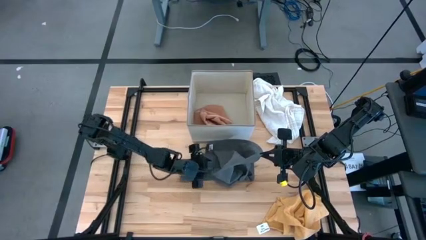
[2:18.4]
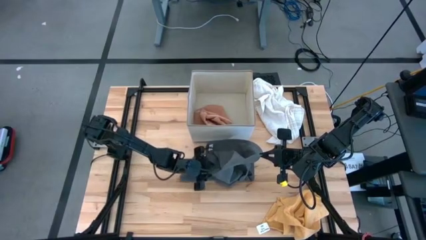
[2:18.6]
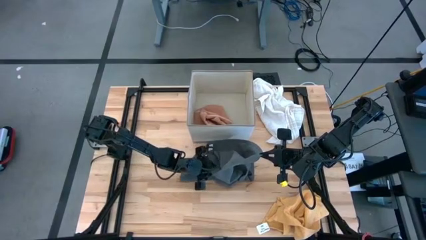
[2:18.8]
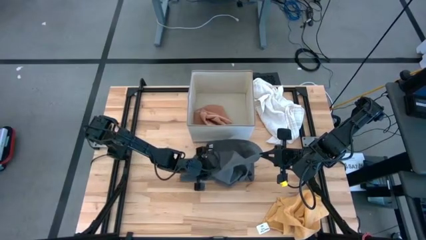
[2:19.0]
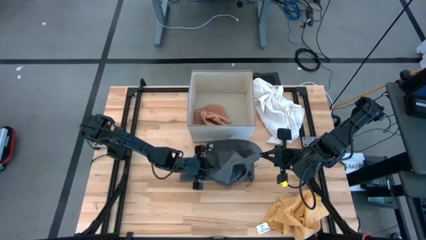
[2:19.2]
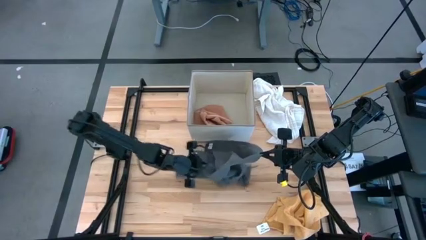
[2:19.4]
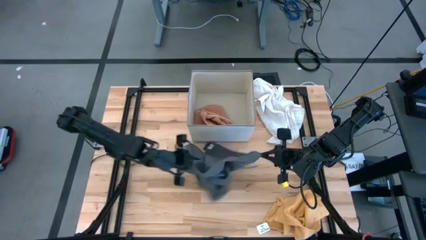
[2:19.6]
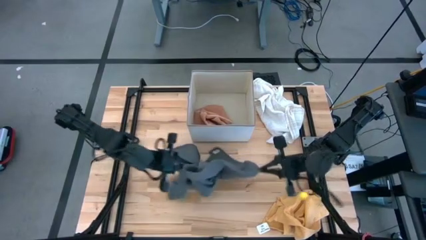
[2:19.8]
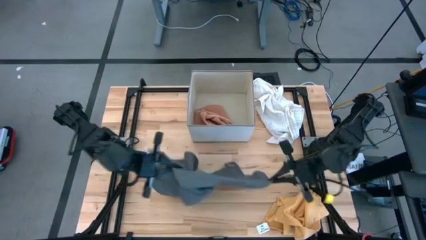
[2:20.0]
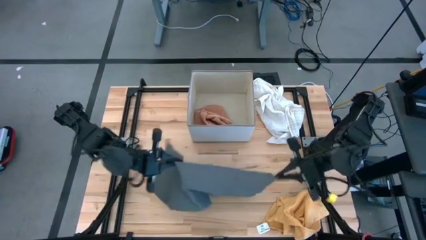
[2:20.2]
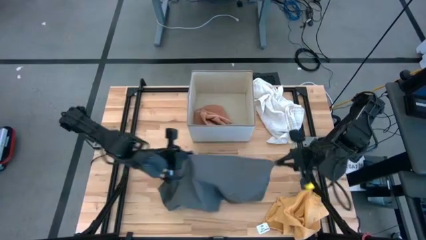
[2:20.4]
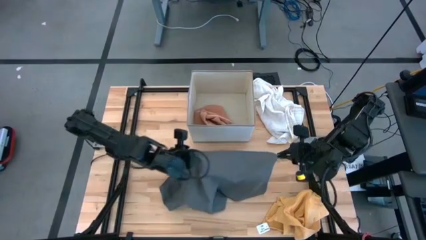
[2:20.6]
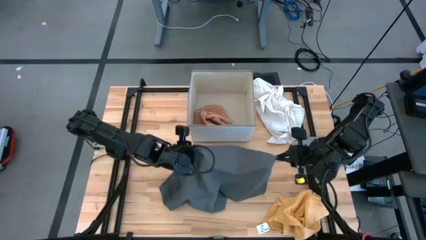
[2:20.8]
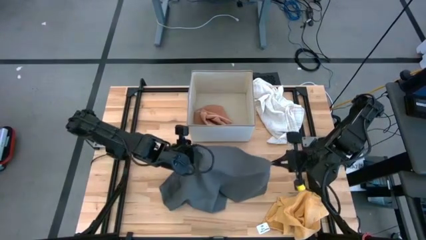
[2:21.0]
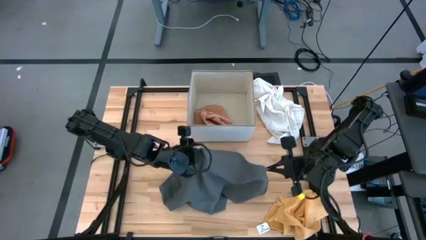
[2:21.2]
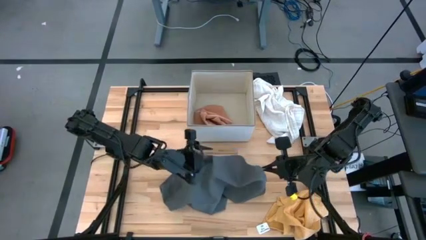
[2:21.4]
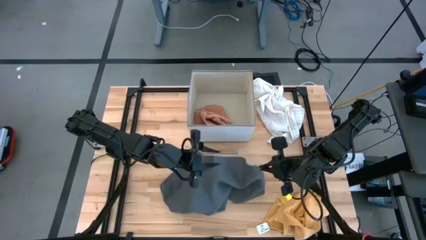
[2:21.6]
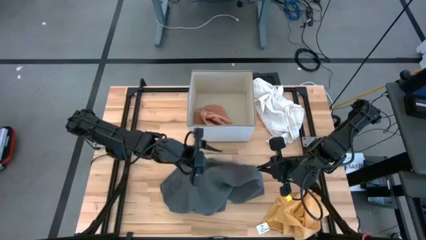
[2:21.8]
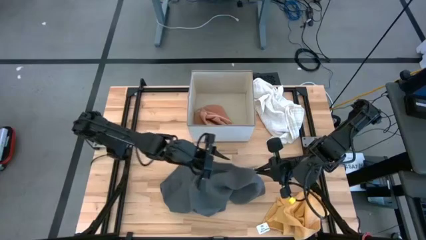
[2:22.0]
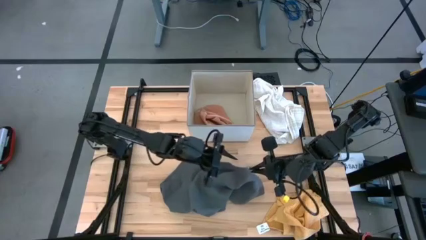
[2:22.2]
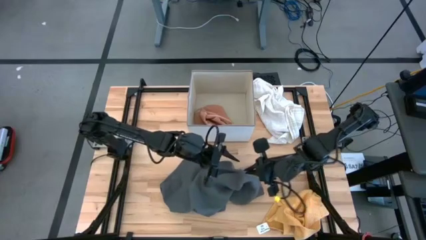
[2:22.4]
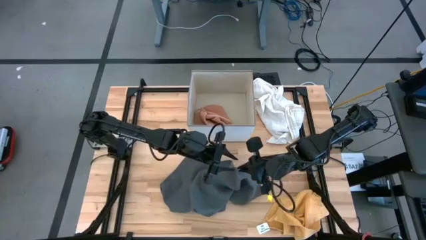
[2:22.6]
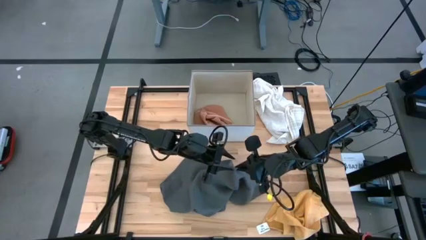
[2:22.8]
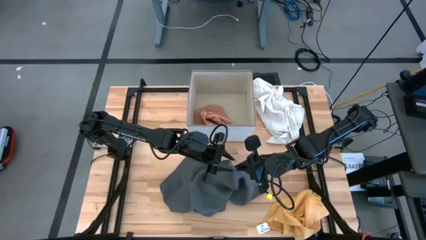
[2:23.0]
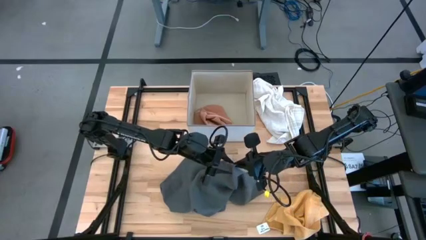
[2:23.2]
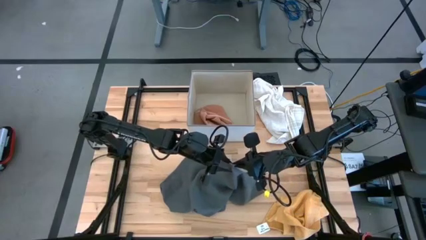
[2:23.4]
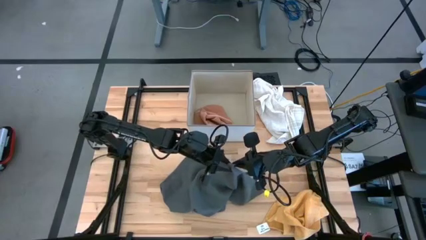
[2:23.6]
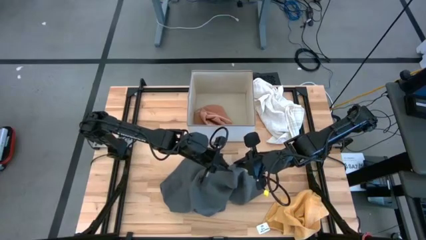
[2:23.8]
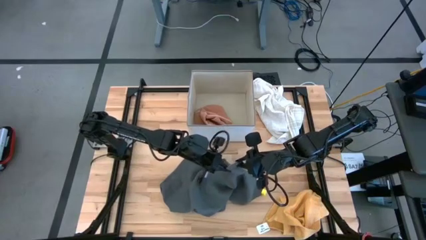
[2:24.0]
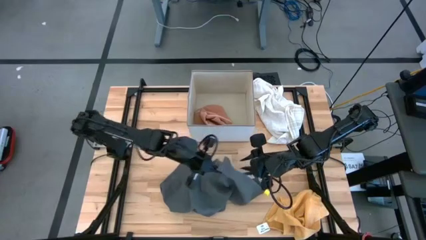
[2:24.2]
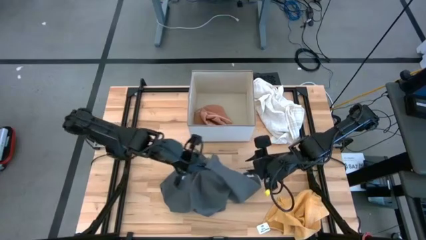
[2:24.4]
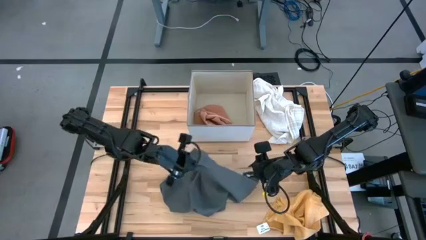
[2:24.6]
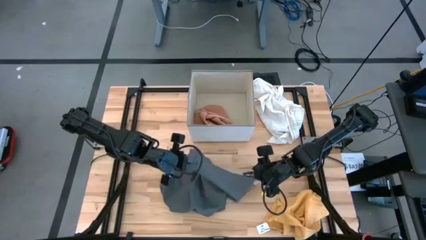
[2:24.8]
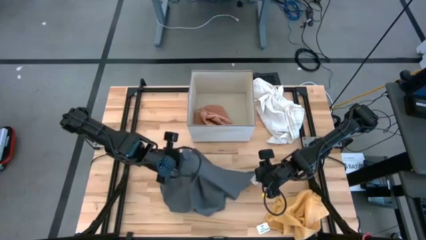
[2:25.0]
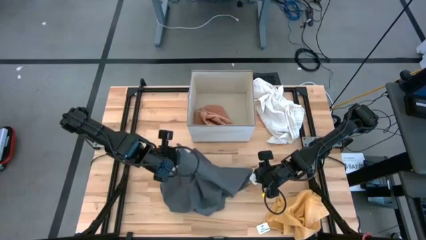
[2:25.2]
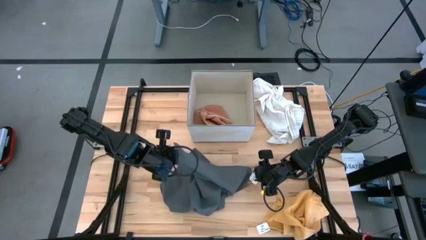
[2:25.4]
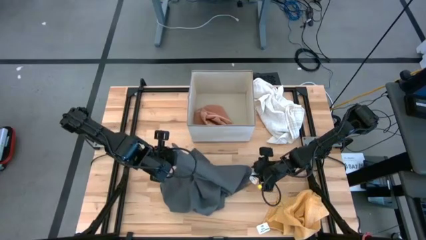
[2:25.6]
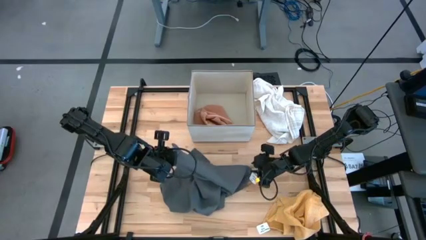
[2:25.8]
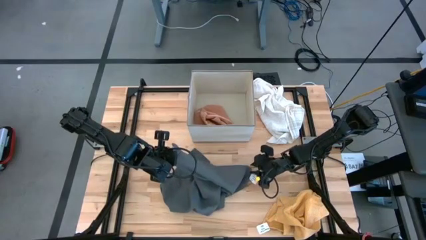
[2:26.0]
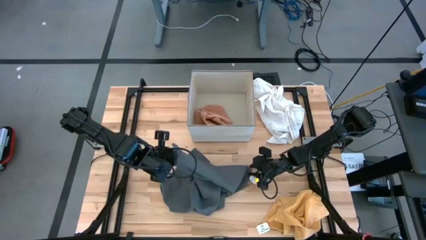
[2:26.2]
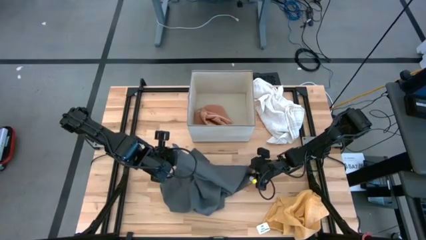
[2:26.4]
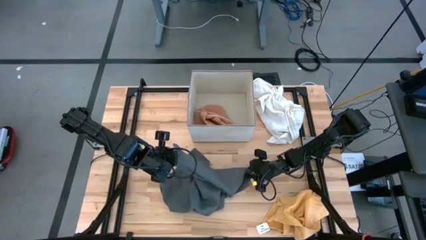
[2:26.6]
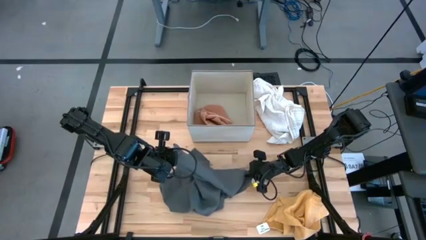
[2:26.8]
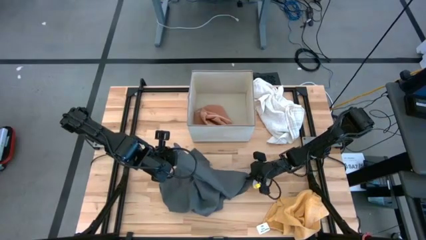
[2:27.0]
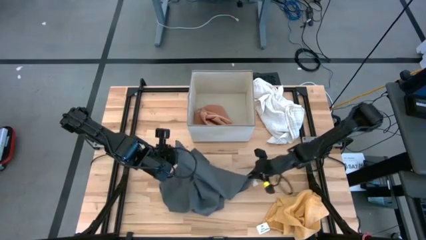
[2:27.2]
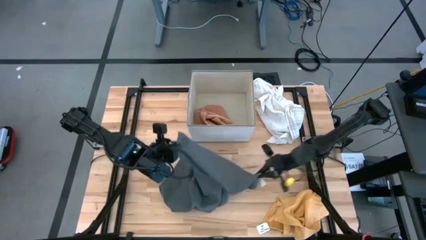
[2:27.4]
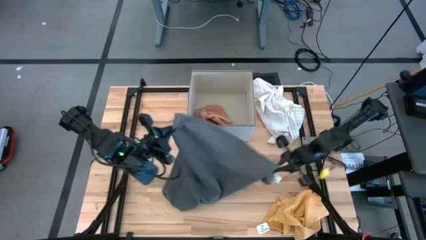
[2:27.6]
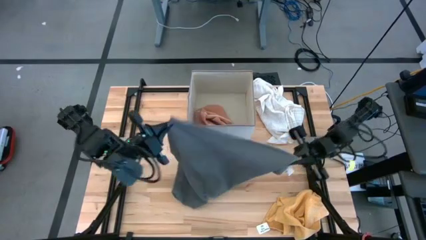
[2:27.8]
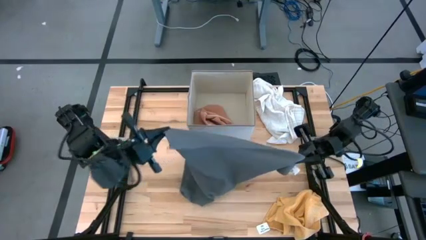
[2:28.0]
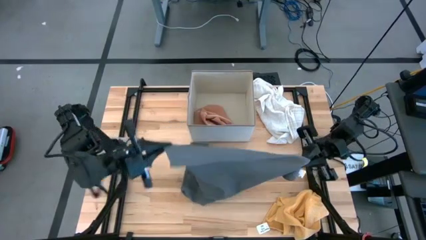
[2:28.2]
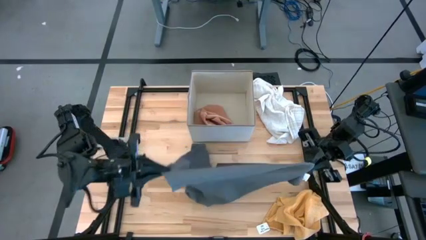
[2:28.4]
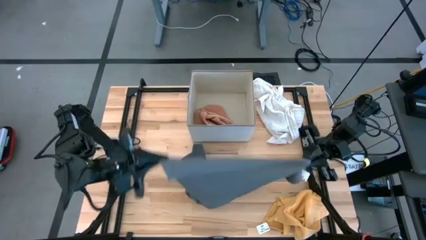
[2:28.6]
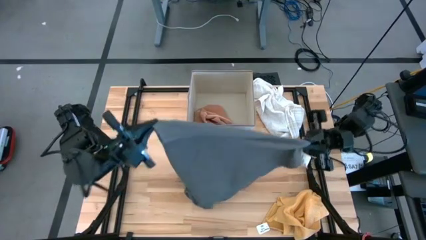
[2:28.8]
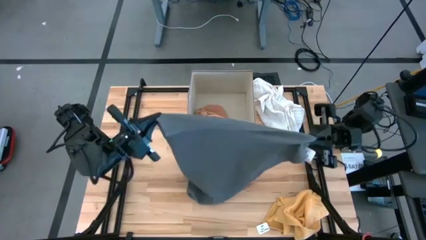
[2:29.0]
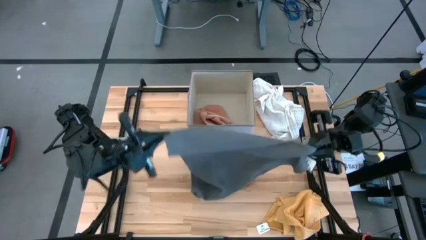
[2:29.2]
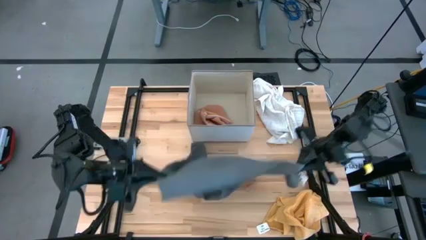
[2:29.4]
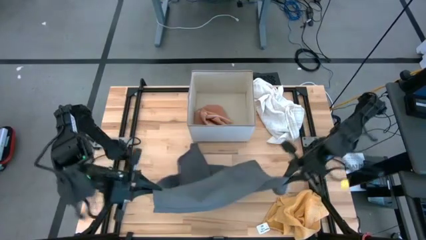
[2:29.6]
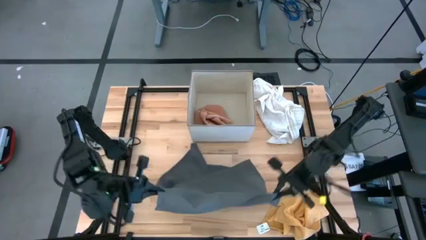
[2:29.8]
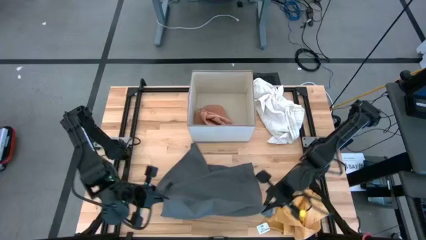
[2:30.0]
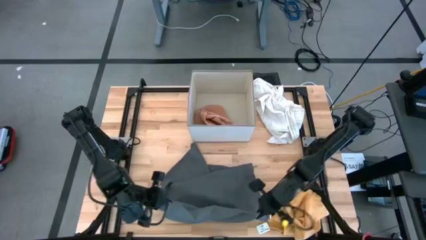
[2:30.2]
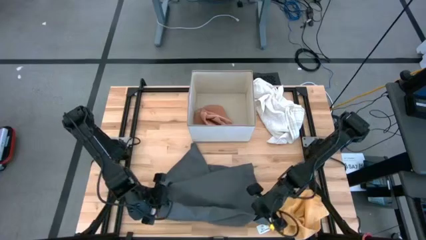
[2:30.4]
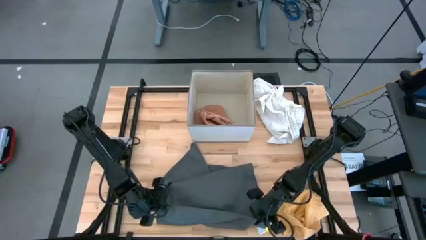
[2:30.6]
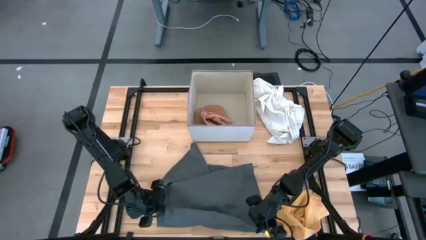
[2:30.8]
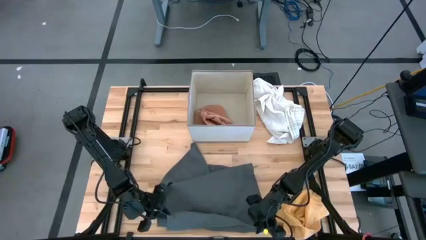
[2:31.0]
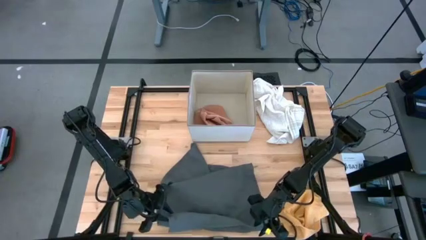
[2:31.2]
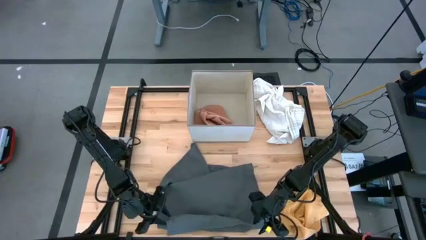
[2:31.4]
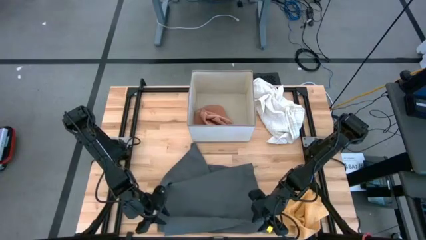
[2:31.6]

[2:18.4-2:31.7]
Task: Fold towel
Fold the gray towel
